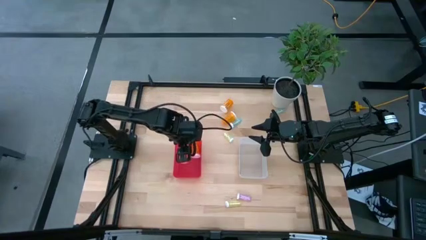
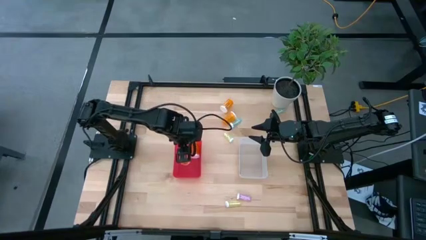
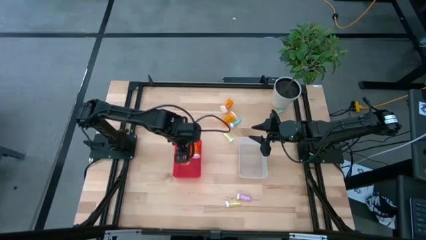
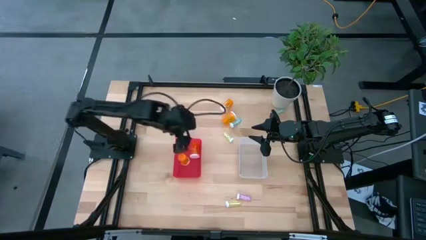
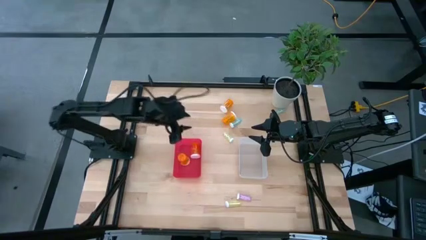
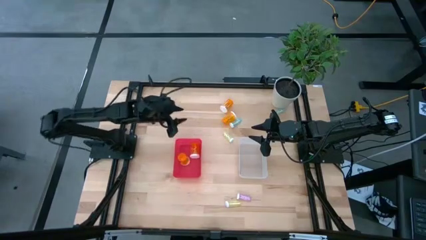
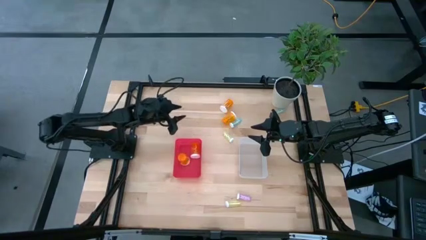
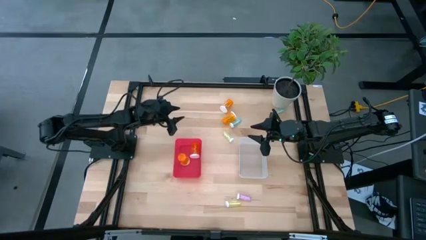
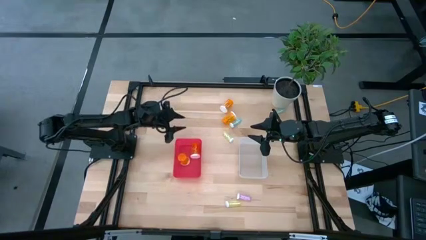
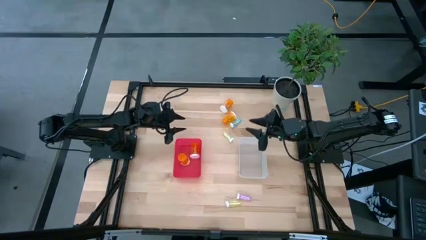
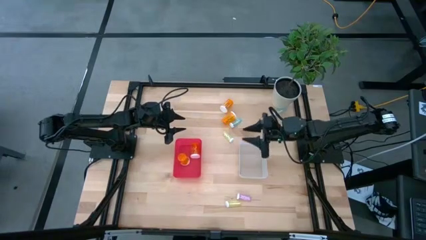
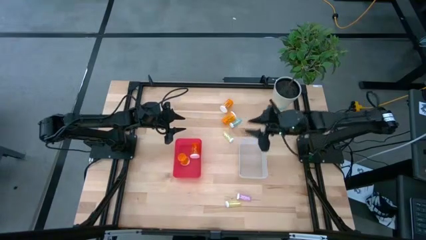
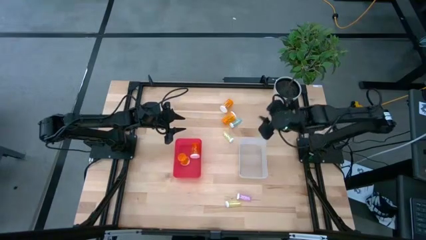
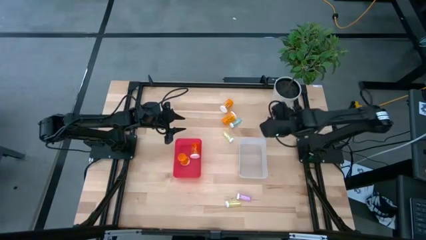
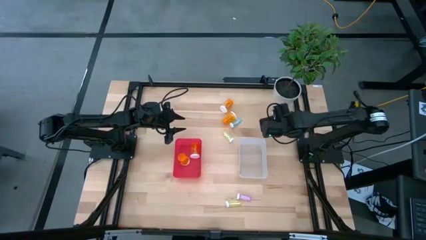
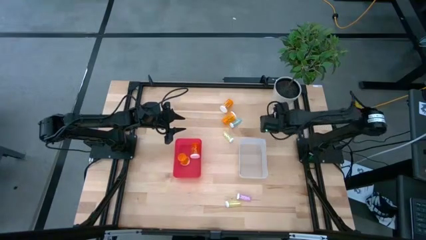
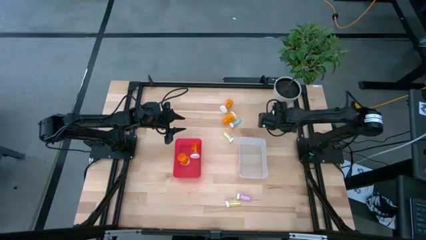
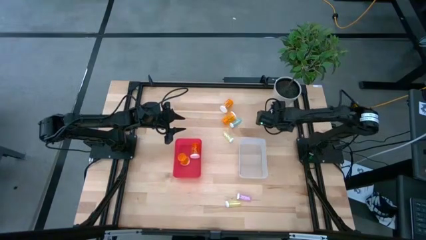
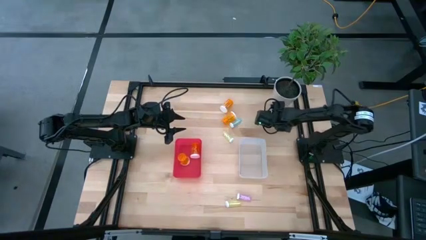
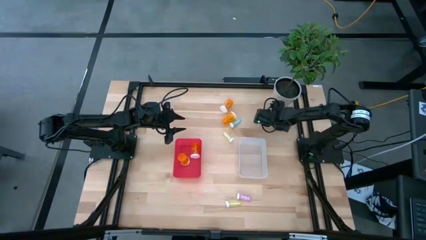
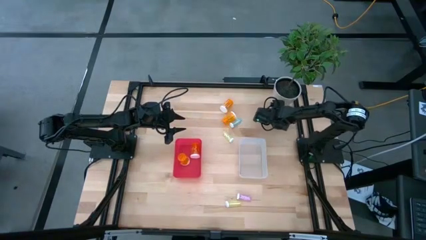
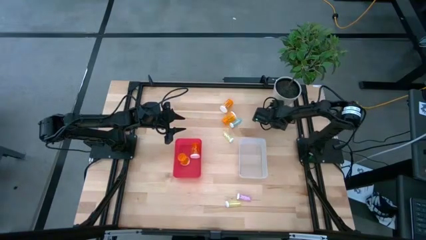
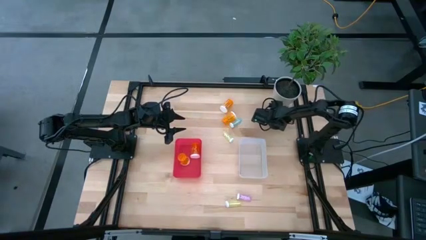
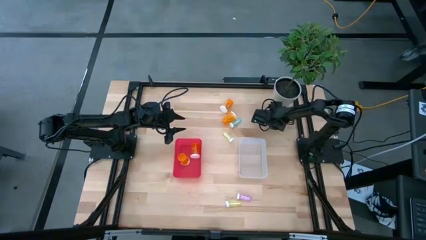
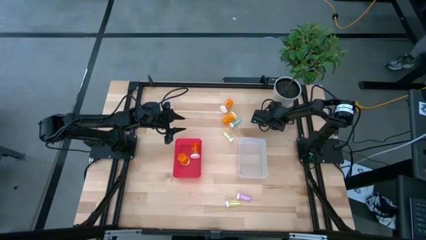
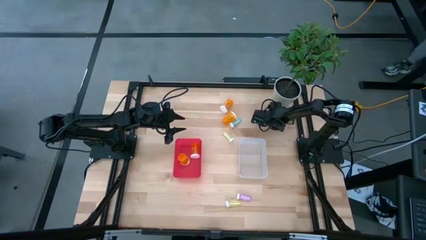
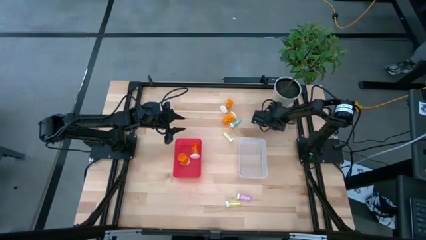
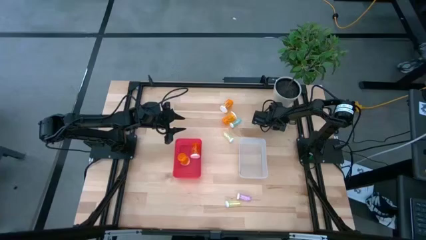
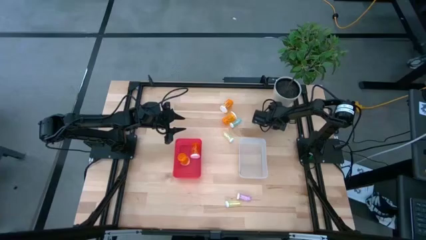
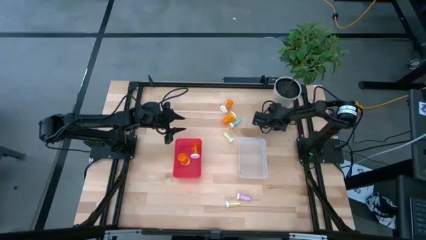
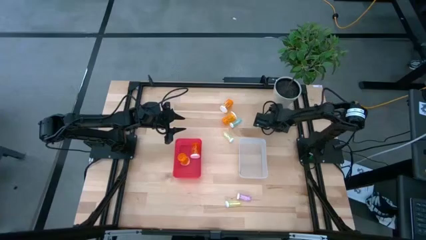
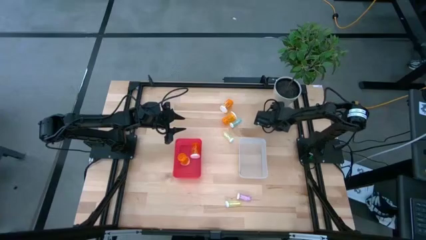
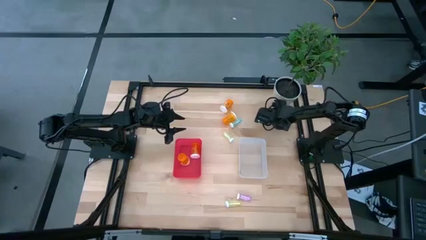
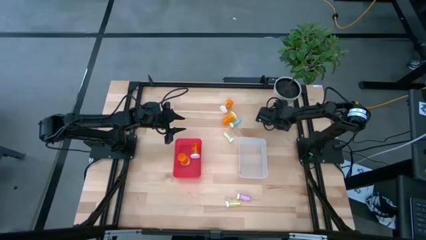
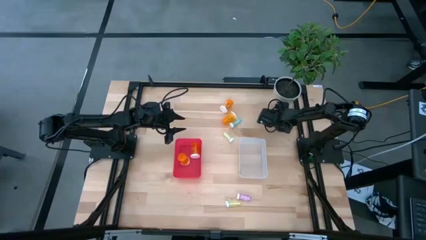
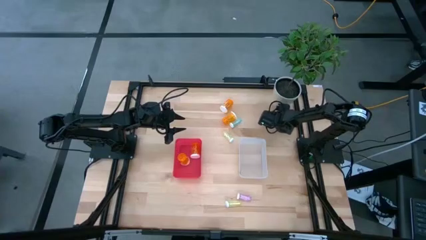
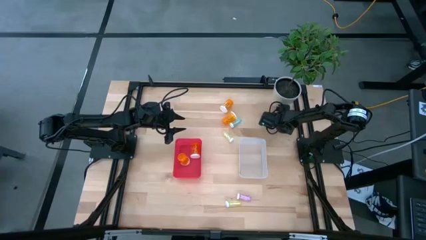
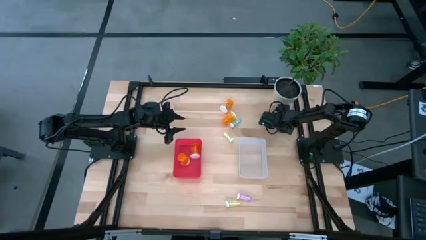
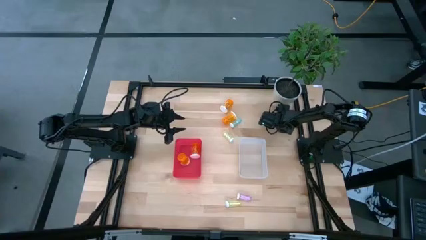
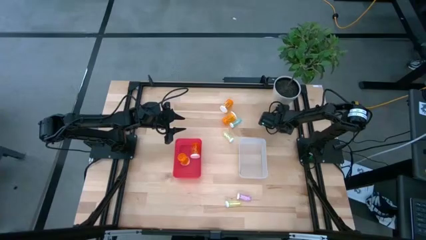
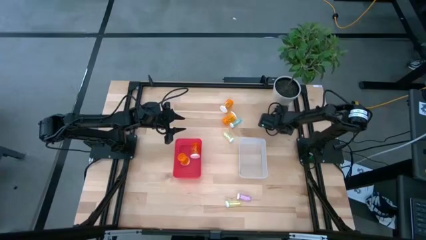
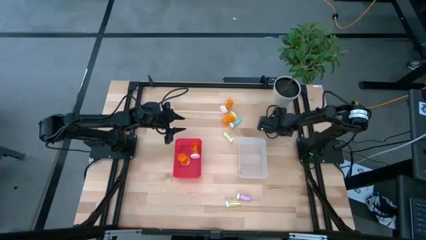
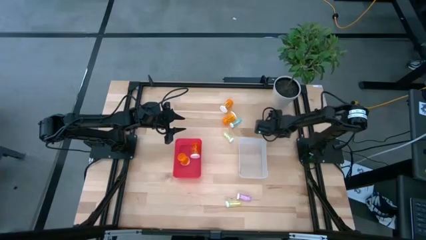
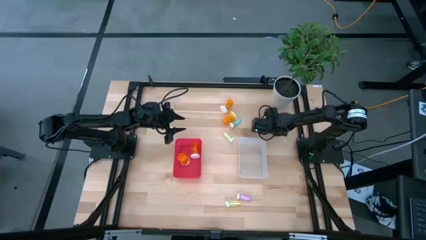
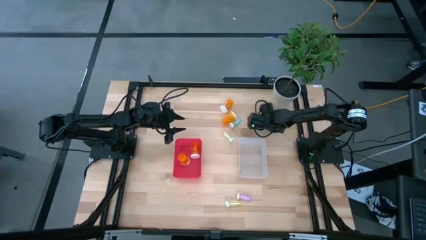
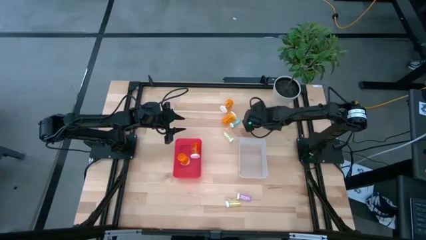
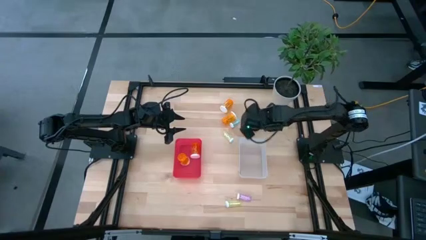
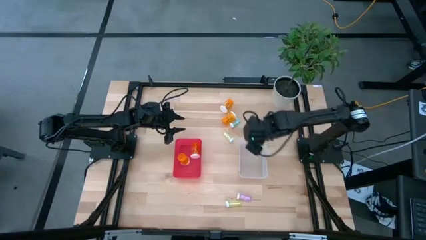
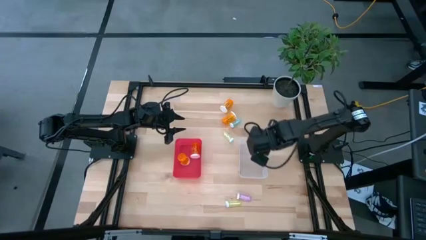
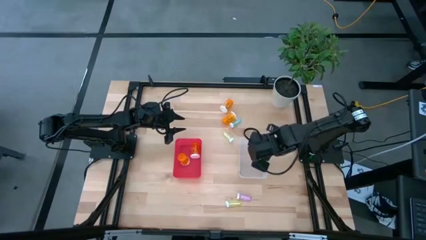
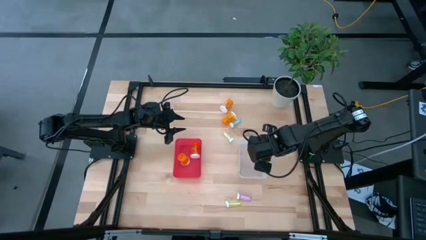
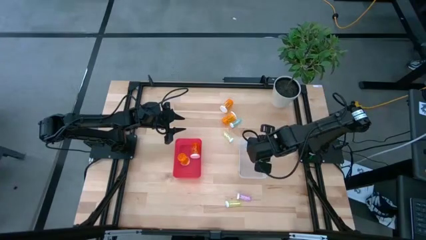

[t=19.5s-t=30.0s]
Task: Pick and place medicine bottles into bin by pill shape (circle, oval)
Put the small blue pill bottle into the white bin

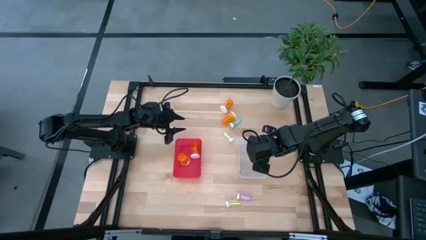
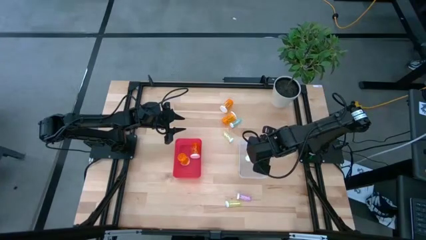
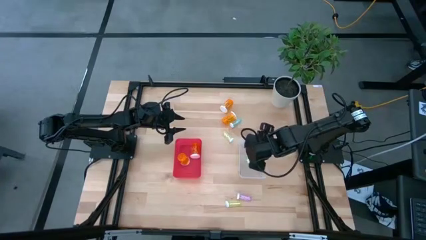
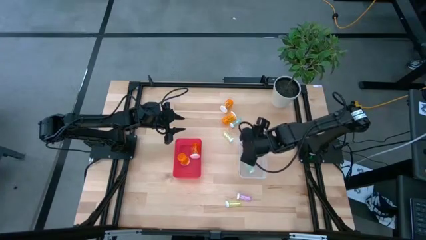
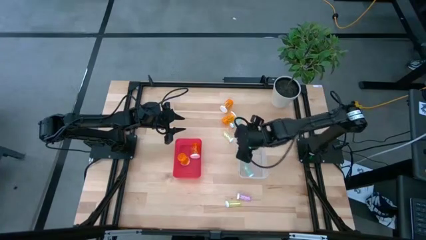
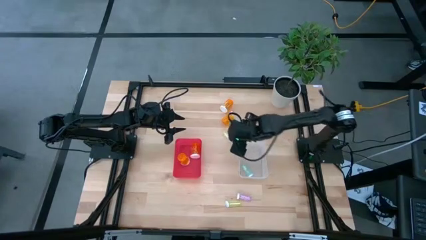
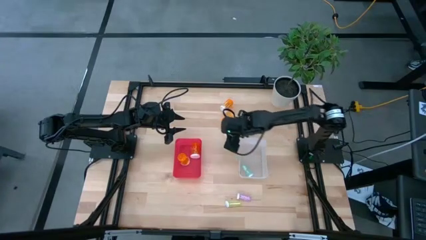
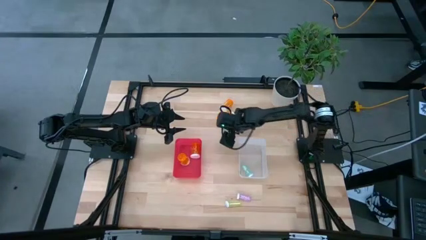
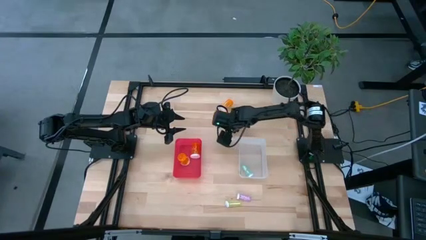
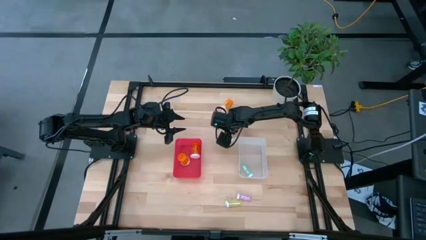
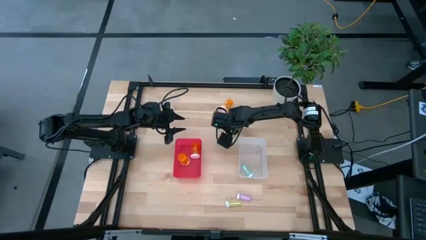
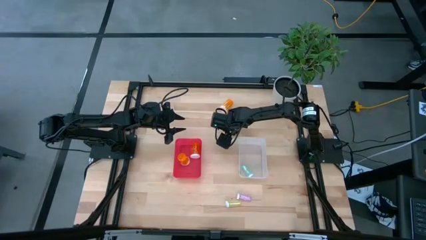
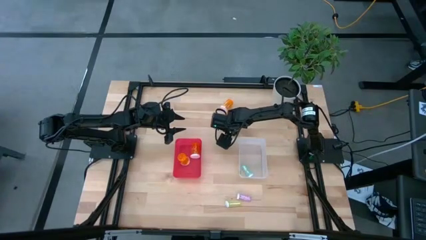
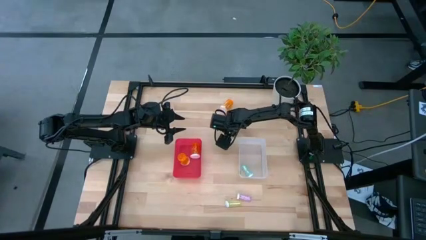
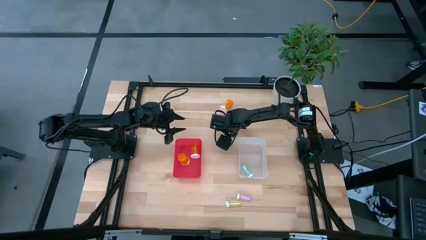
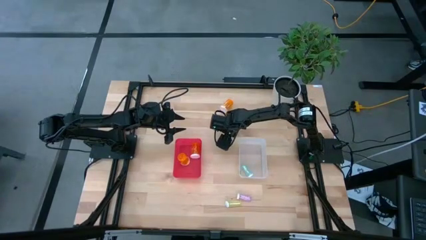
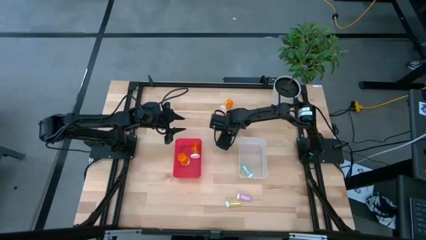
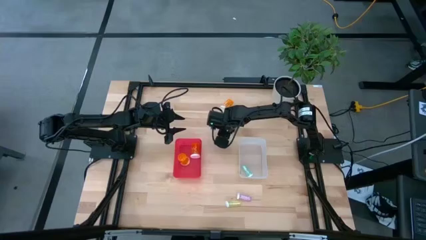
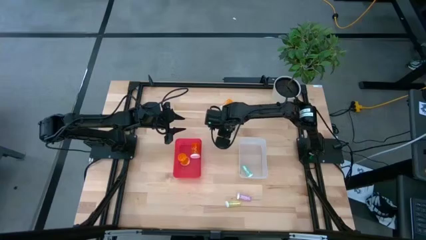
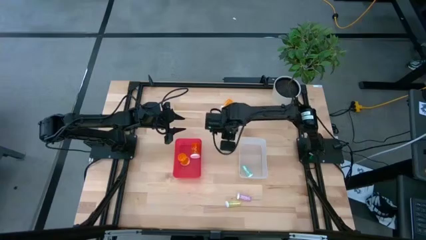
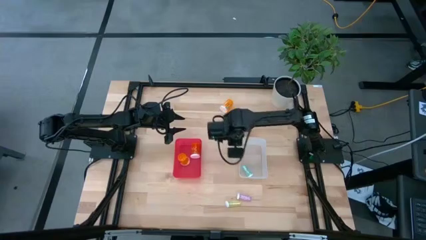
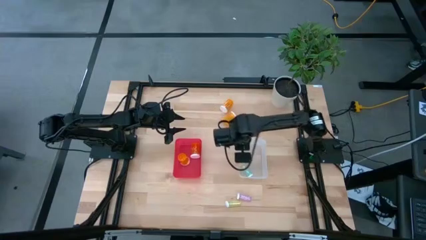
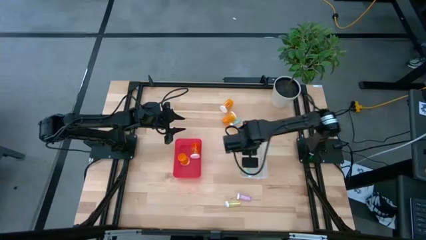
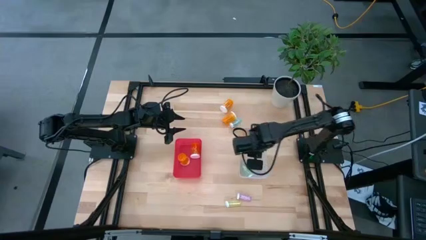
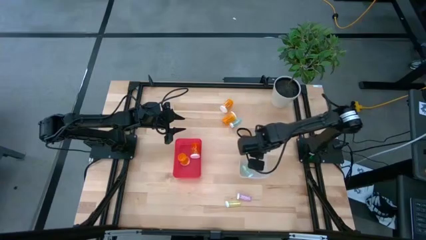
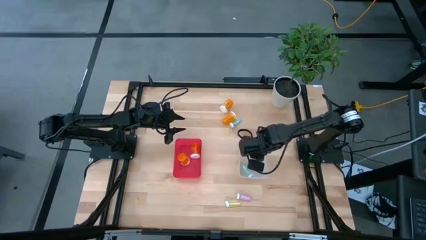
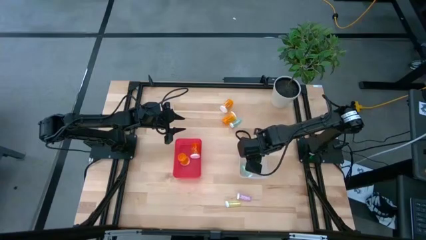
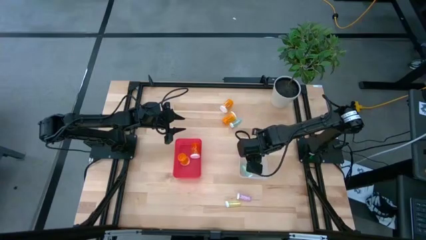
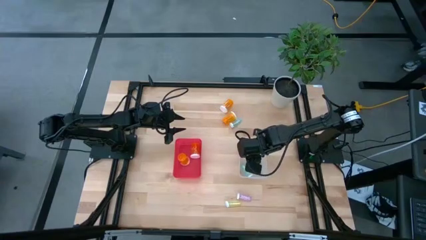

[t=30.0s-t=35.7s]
Put the small yellow pill bottle into the white bin
